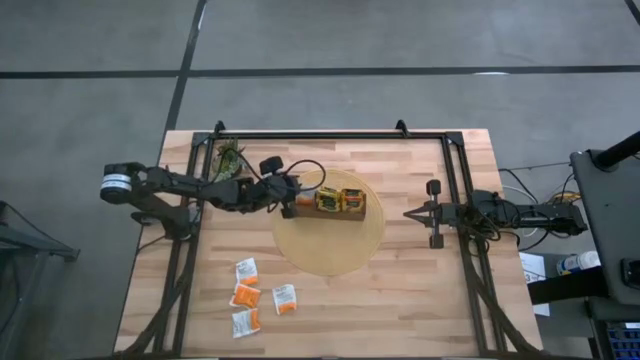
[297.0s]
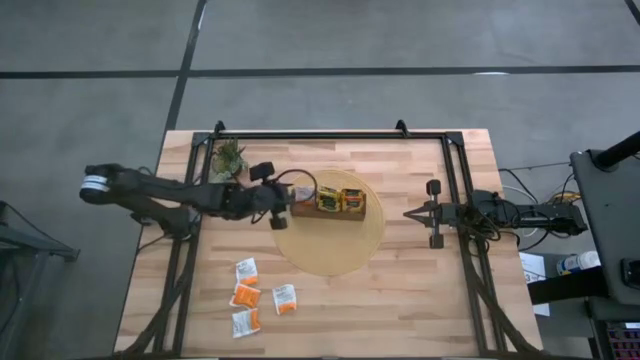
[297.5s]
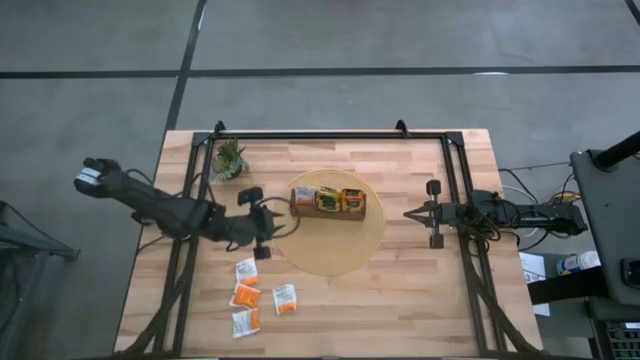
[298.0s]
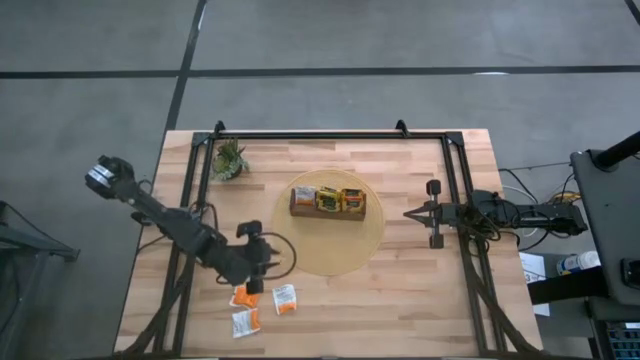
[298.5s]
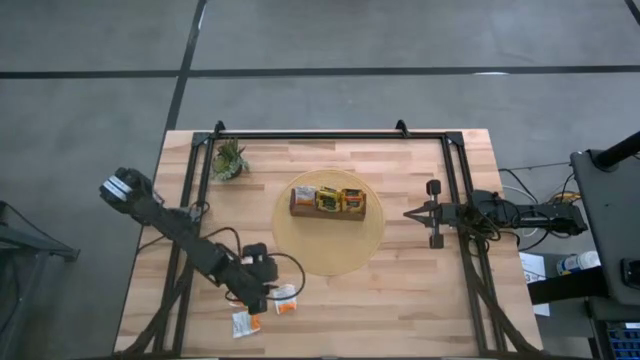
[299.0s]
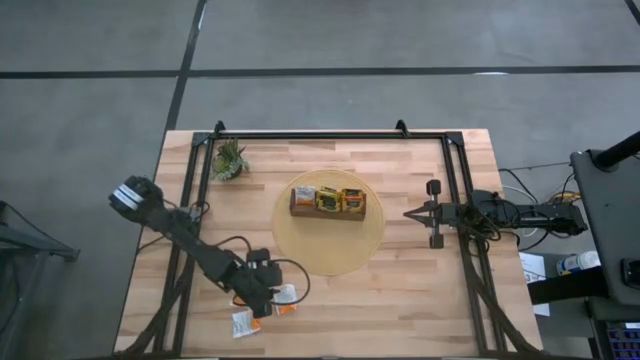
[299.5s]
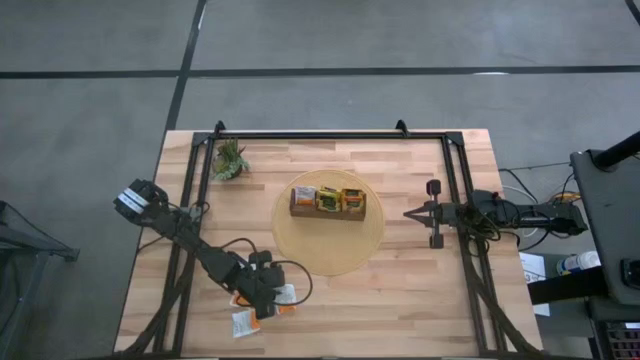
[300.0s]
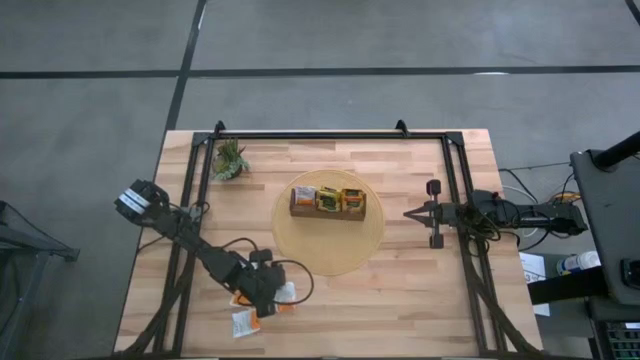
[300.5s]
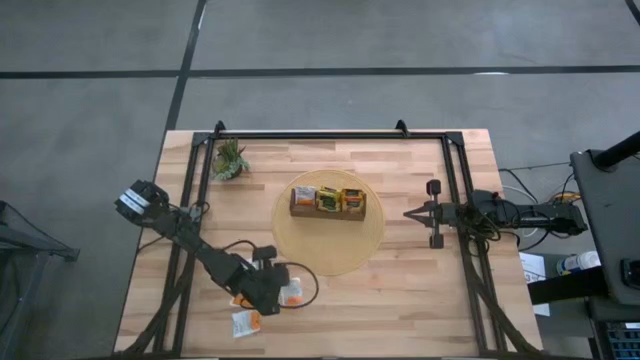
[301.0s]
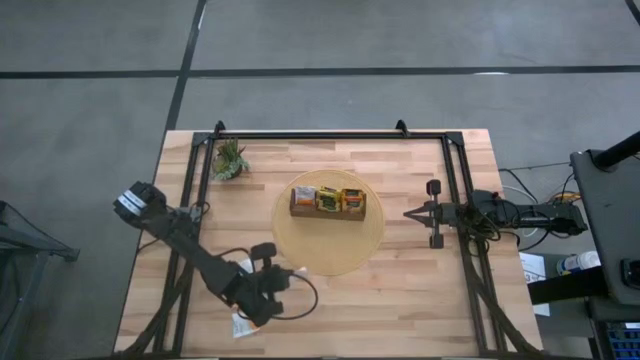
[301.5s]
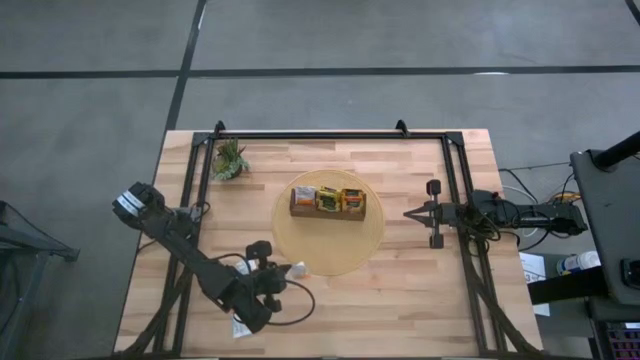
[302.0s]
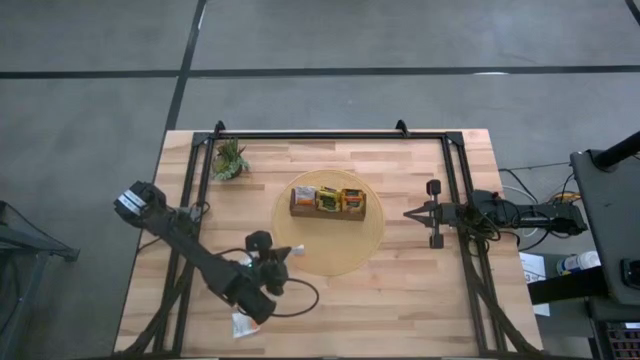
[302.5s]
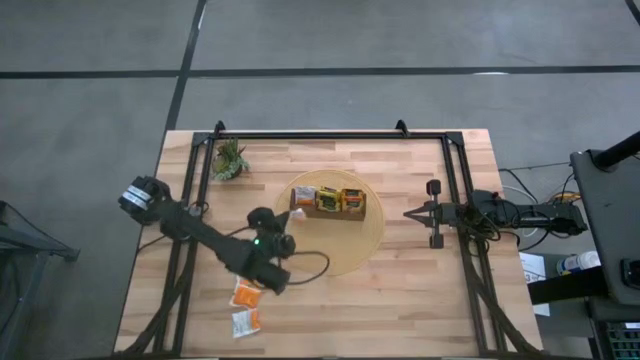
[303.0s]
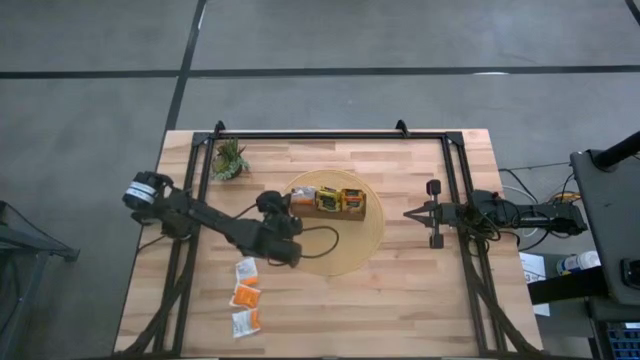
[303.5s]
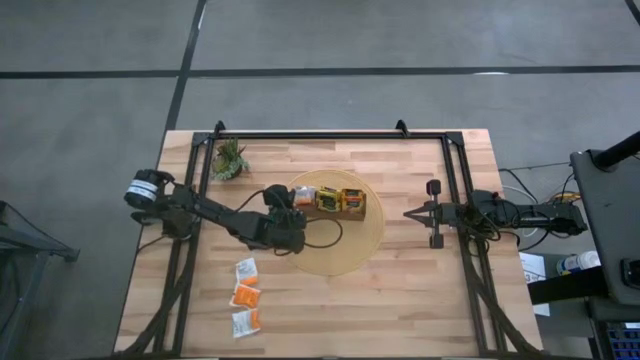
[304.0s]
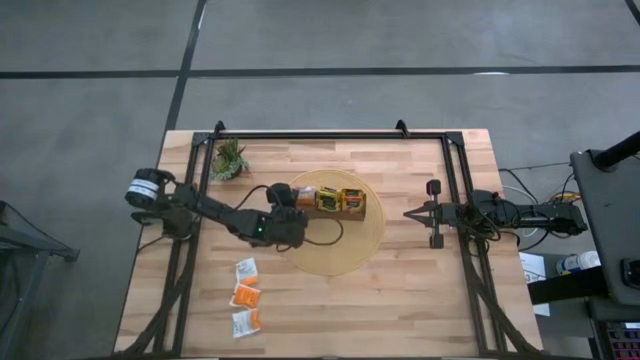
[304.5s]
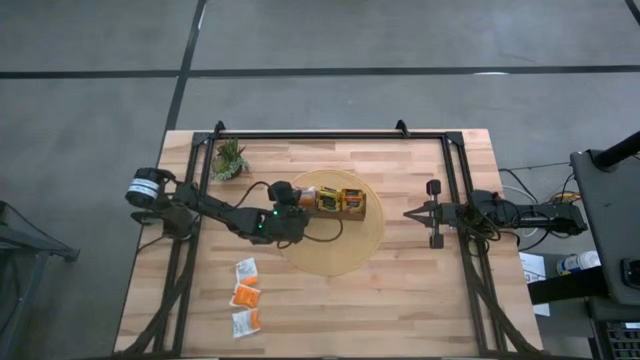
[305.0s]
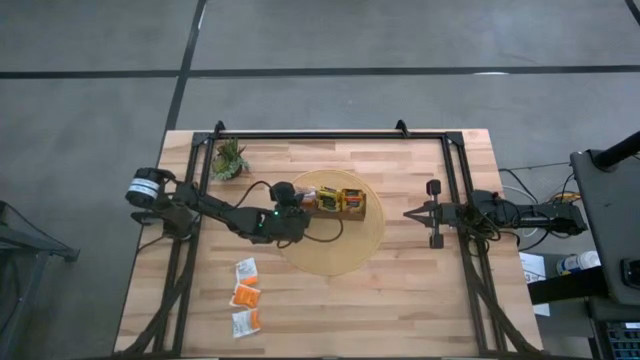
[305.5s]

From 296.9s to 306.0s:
Task: Pick & Place Tea
Put the white tea bag into the left section of the wooden organizer

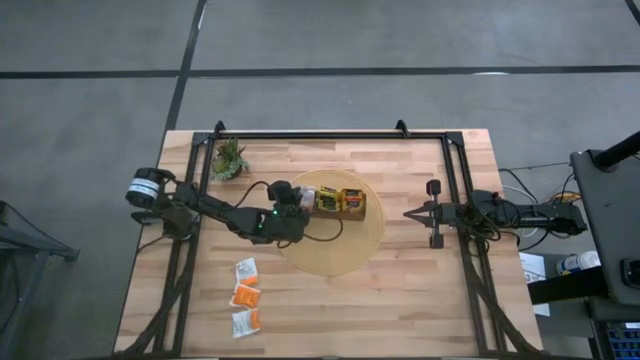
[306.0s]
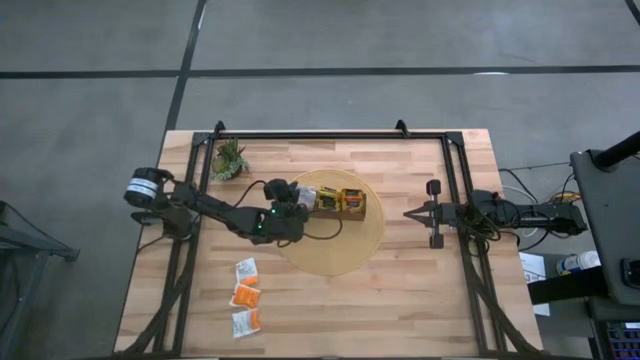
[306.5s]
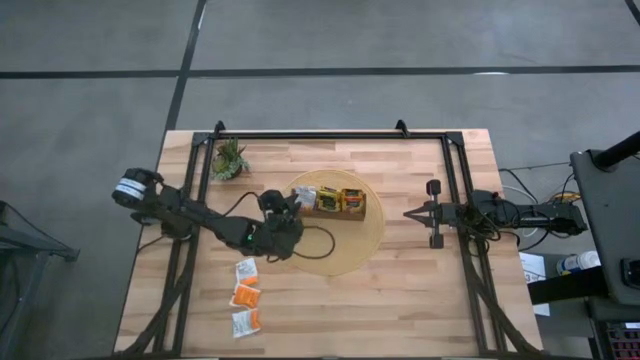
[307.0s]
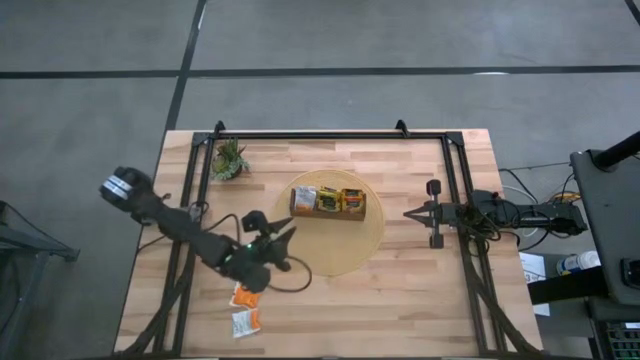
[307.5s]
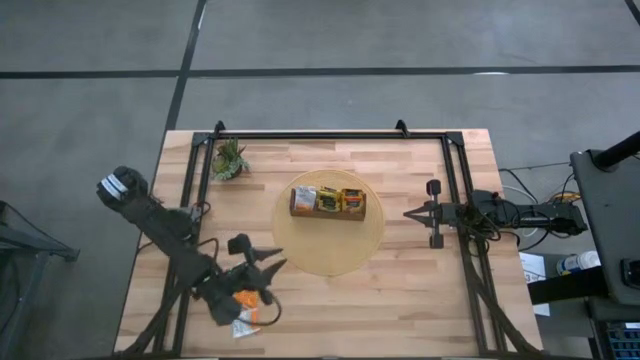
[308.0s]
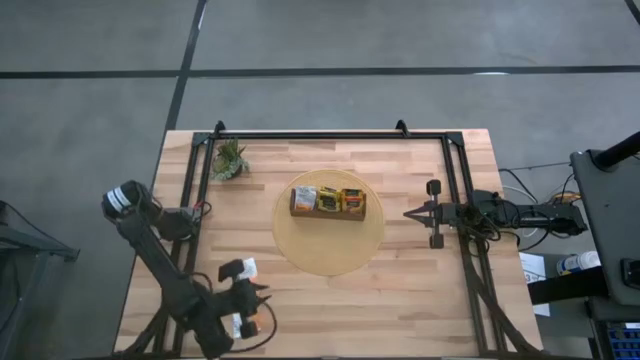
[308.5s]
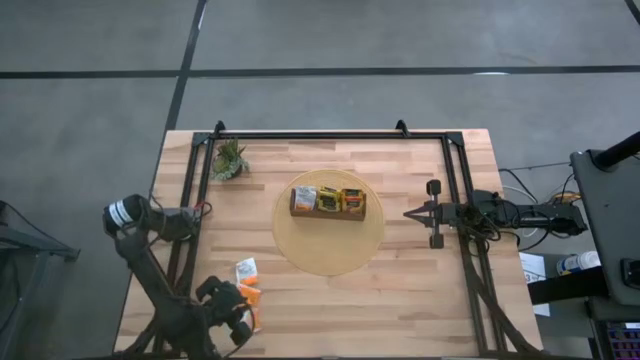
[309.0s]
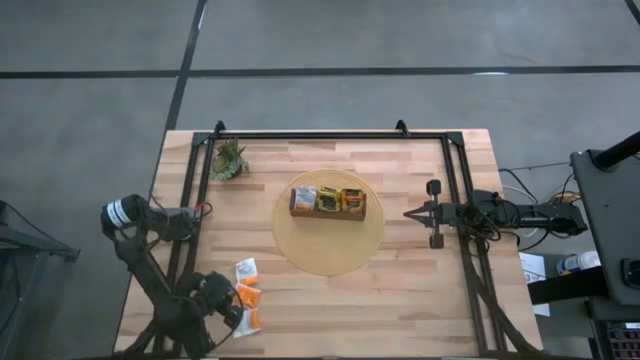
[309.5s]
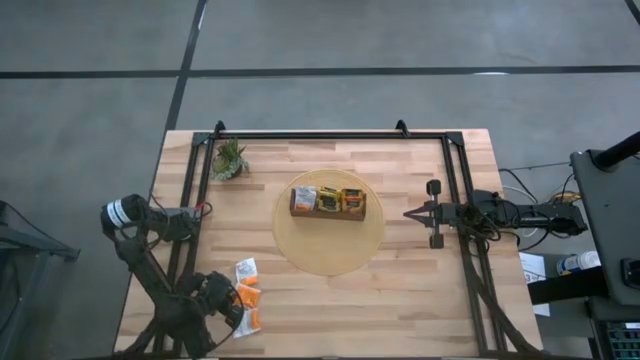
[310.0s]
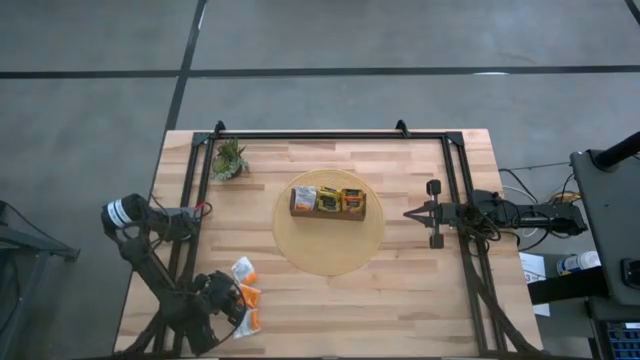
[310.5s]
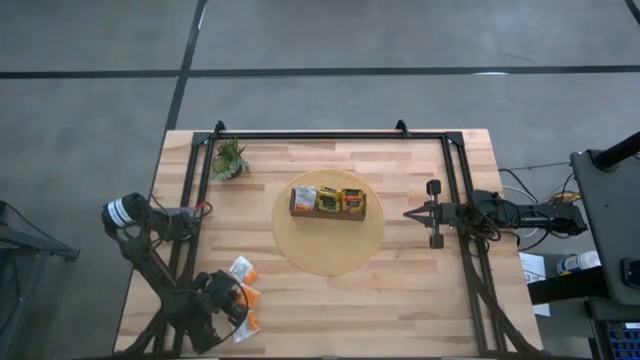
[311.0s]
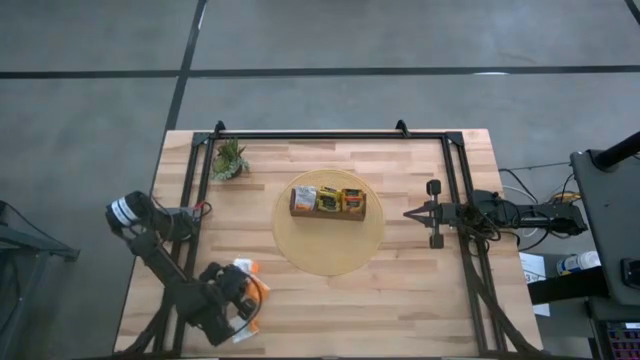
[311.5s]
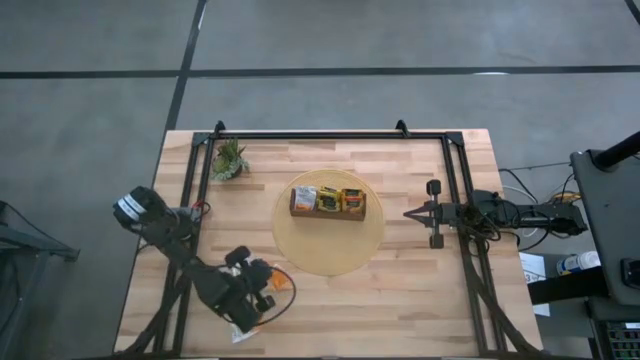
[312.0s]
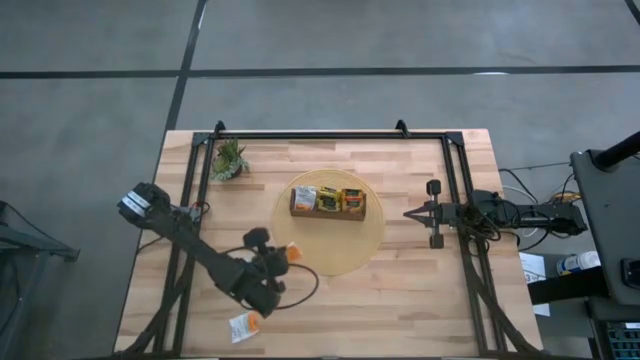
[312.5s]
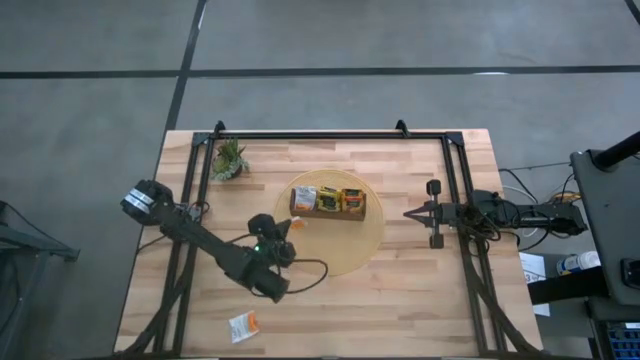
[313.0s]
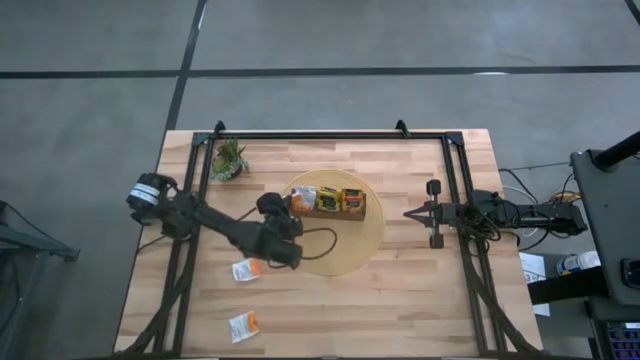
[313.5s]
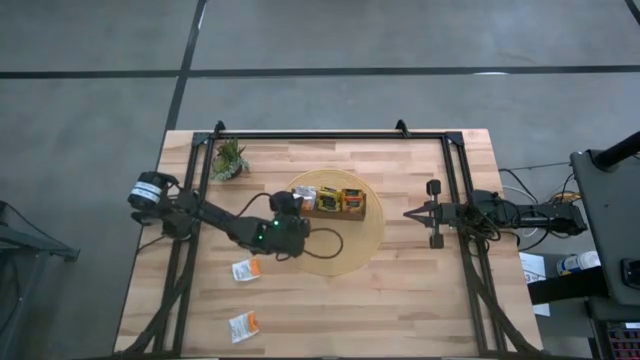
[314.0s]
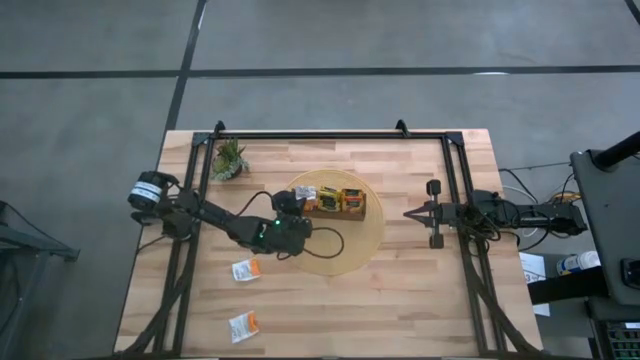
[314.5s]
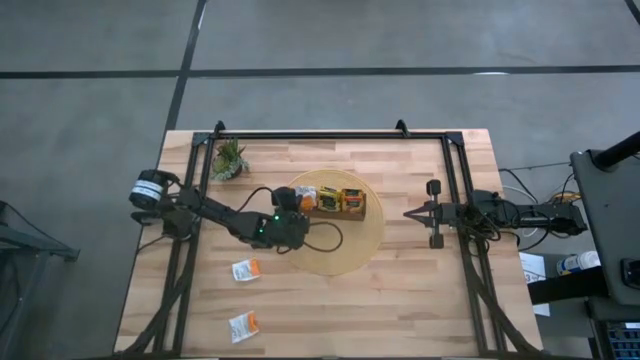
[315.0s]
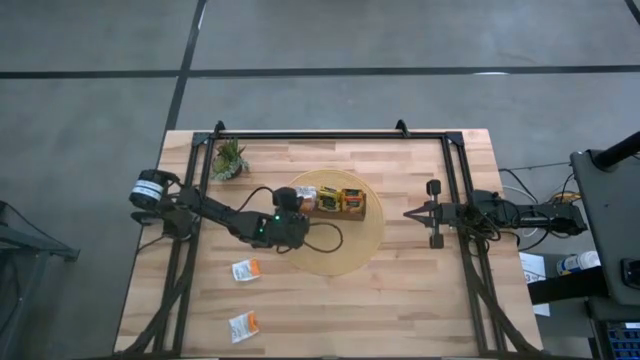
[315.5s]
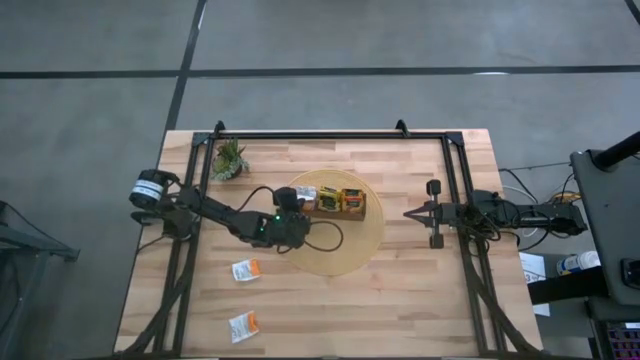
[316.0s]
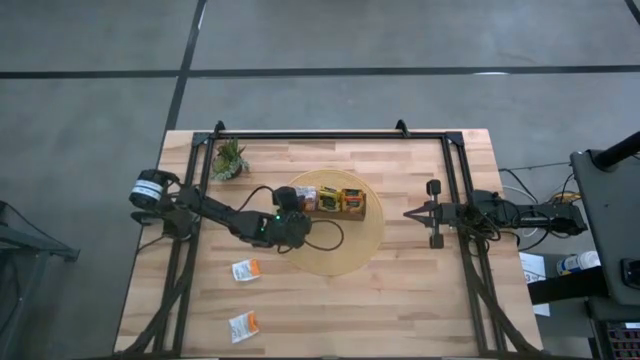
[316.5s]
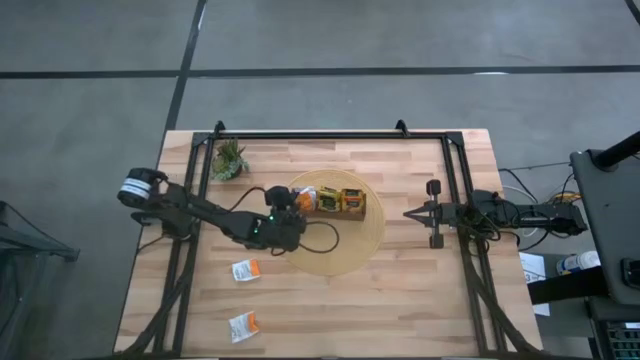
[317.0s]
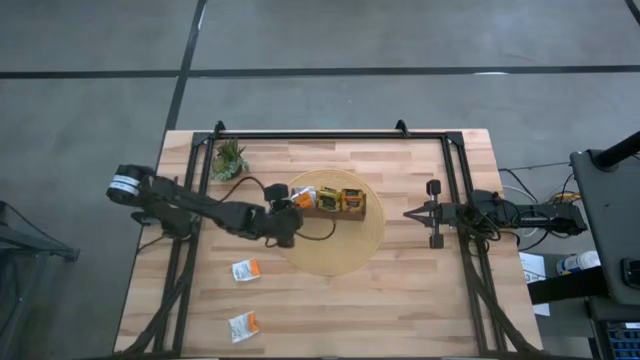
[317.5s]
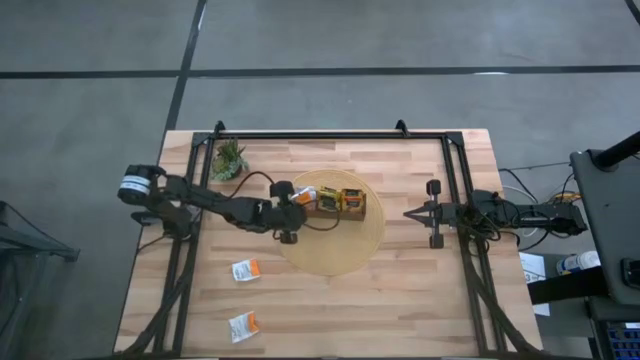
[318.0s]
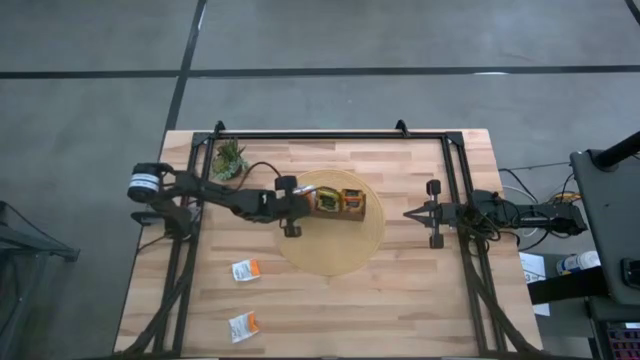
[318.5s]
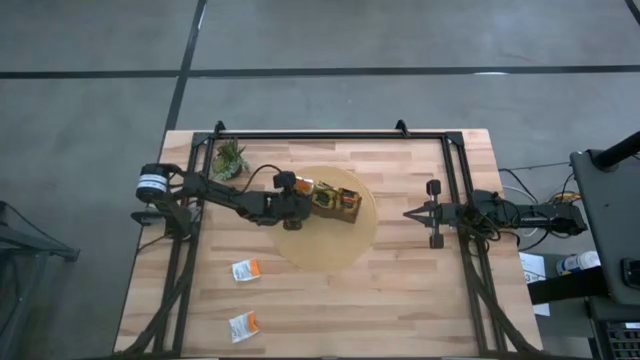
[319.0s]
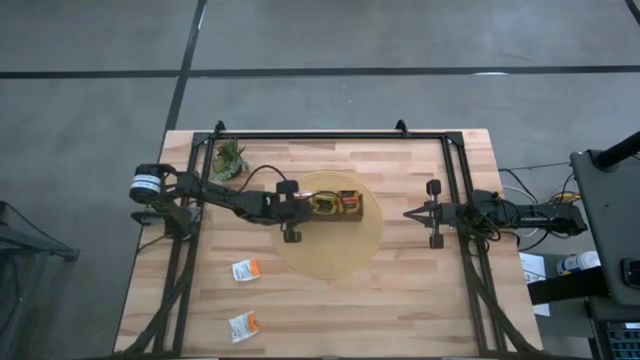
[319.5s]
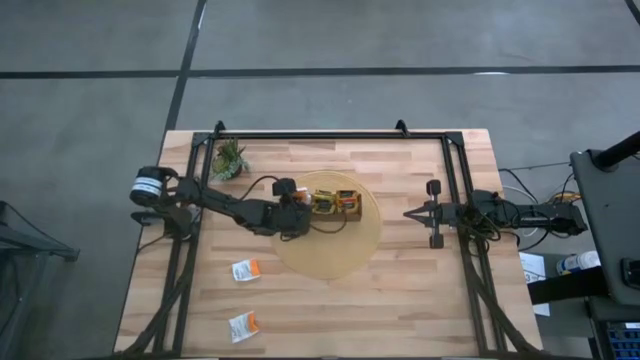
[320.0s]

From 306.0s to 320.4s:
Put the white tea bag into the left section of the wooden organizer
